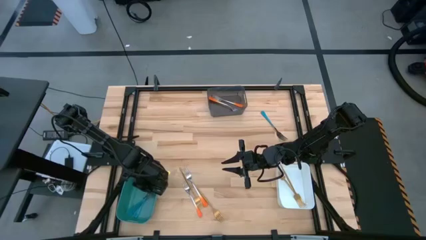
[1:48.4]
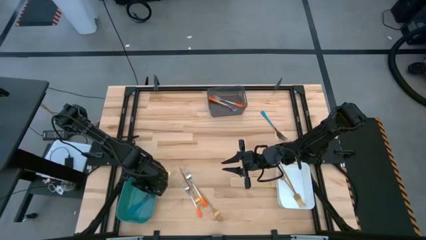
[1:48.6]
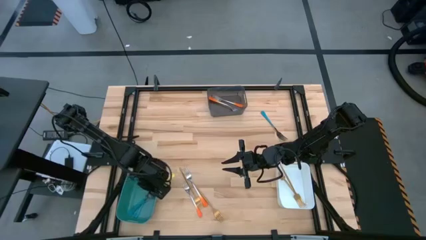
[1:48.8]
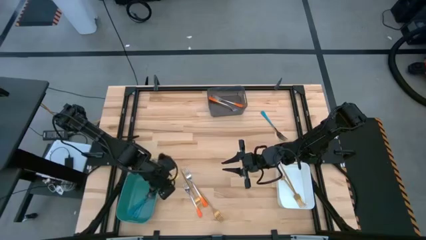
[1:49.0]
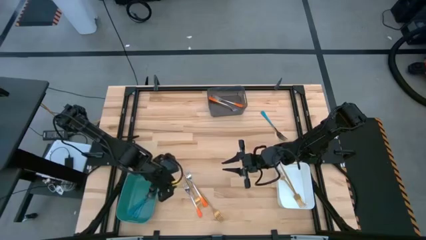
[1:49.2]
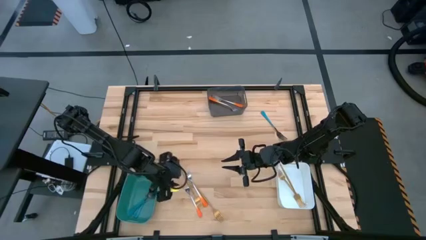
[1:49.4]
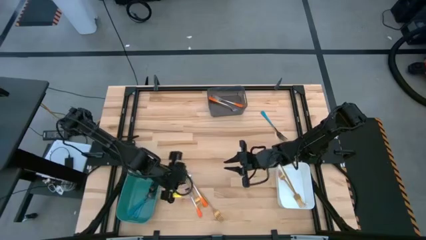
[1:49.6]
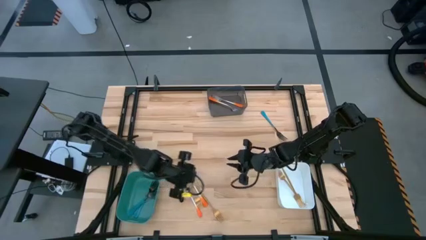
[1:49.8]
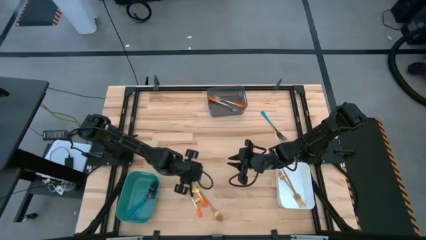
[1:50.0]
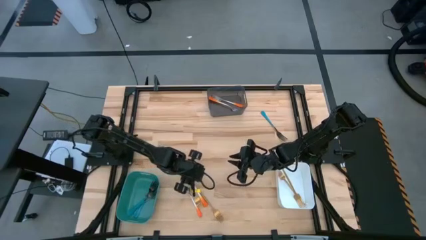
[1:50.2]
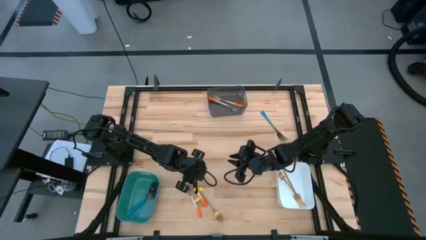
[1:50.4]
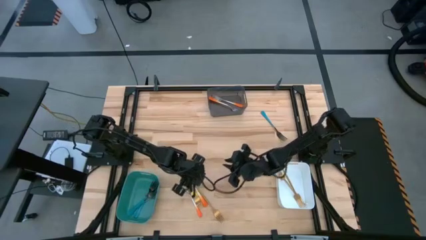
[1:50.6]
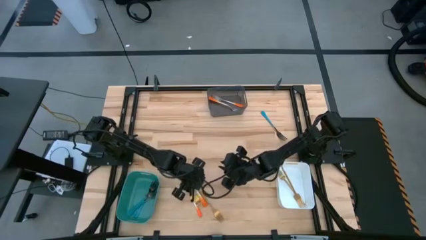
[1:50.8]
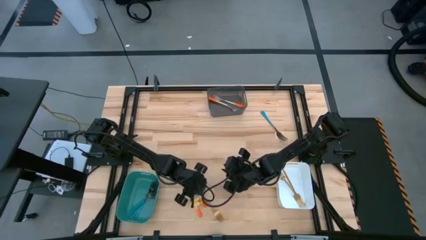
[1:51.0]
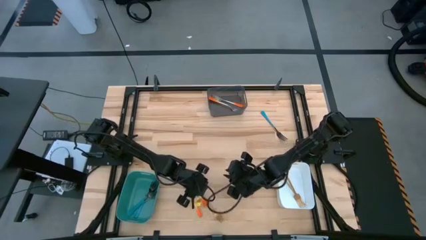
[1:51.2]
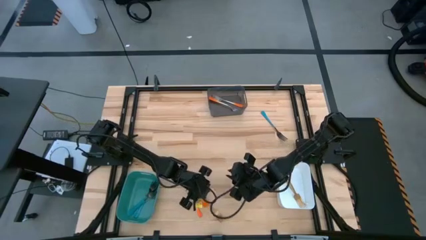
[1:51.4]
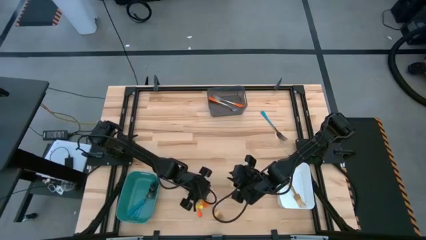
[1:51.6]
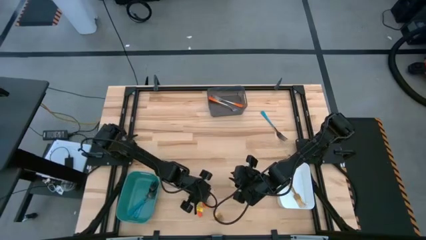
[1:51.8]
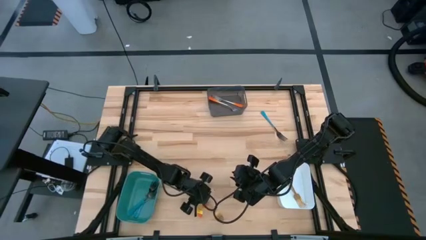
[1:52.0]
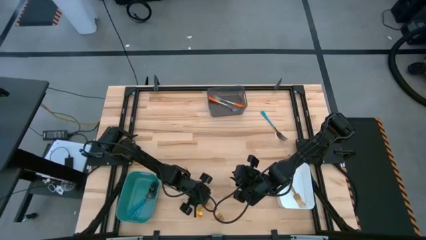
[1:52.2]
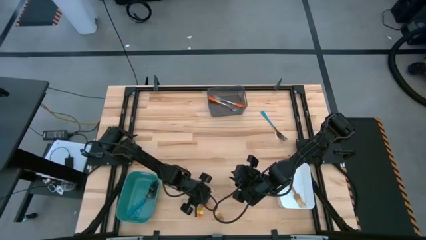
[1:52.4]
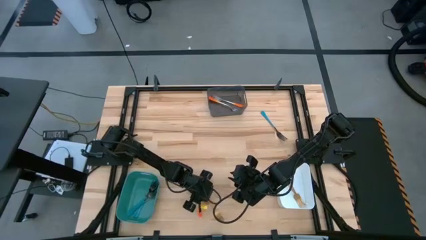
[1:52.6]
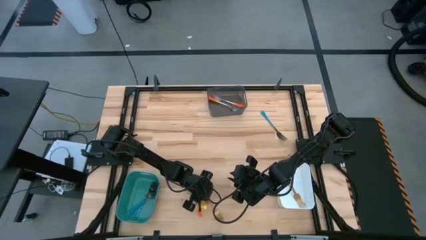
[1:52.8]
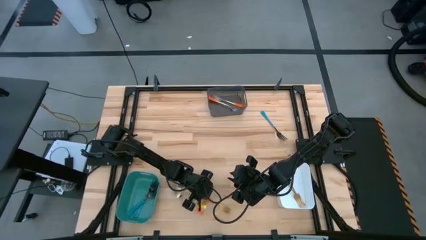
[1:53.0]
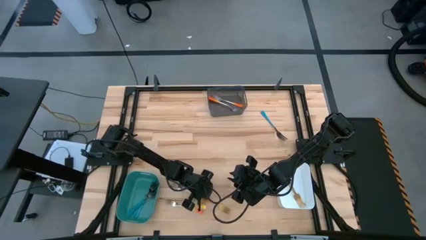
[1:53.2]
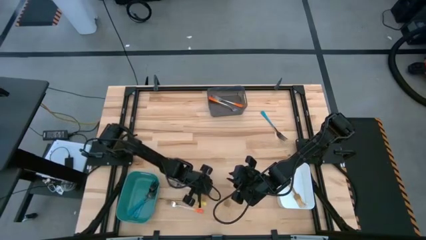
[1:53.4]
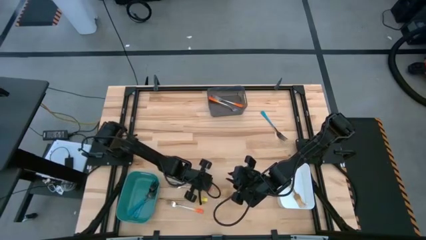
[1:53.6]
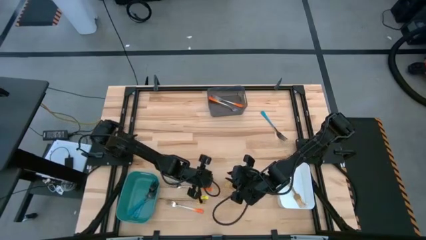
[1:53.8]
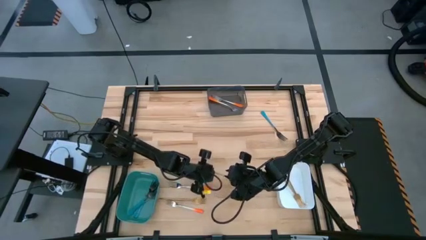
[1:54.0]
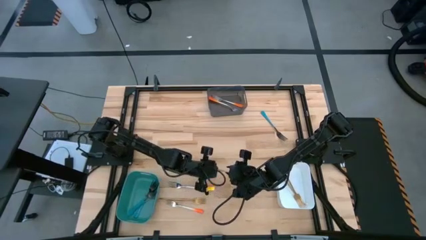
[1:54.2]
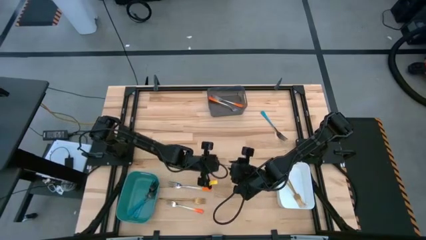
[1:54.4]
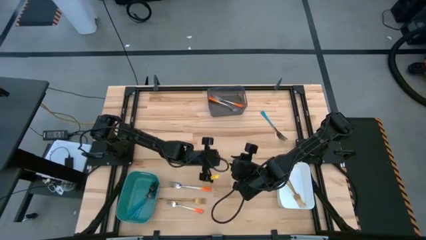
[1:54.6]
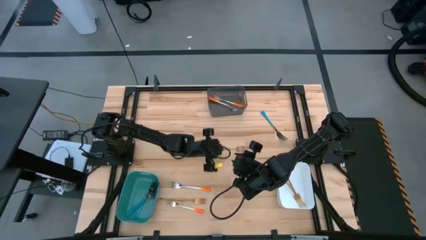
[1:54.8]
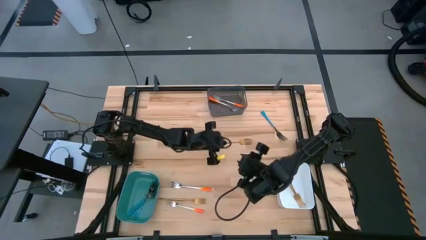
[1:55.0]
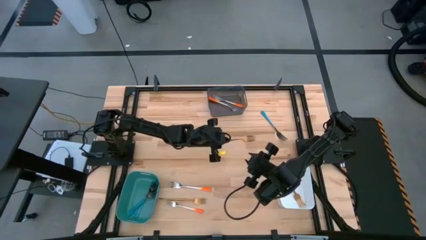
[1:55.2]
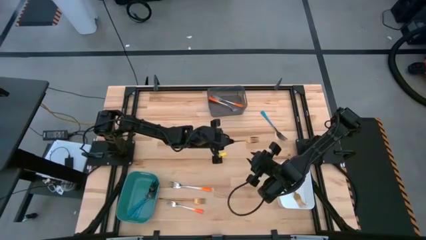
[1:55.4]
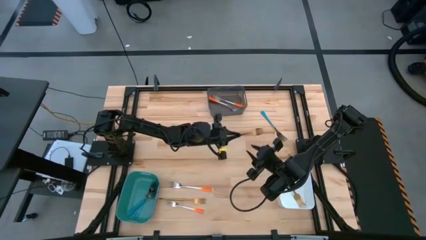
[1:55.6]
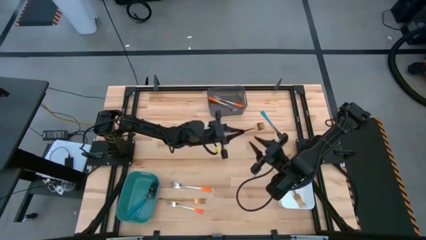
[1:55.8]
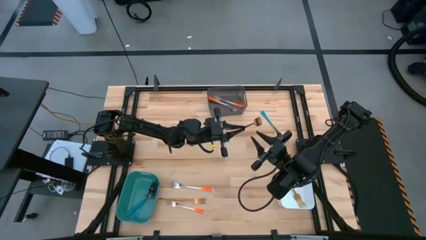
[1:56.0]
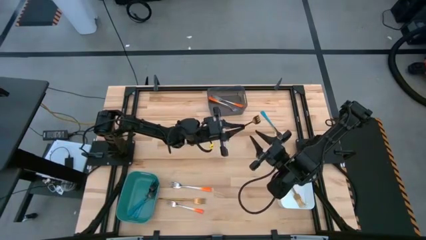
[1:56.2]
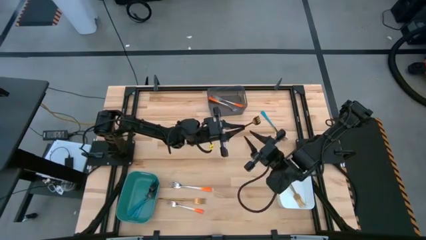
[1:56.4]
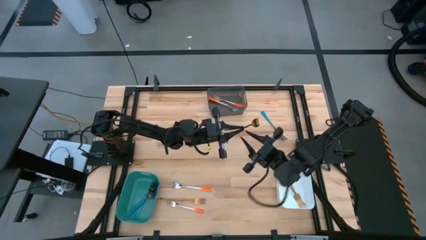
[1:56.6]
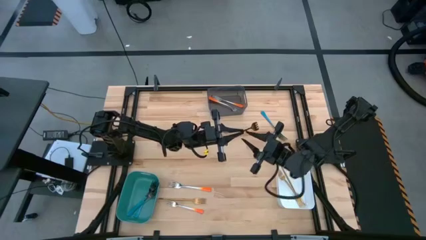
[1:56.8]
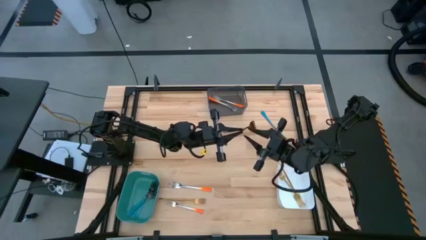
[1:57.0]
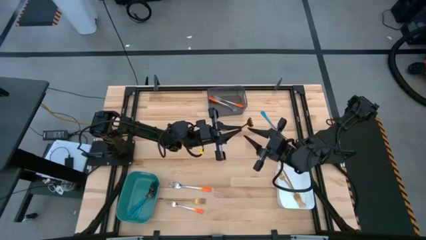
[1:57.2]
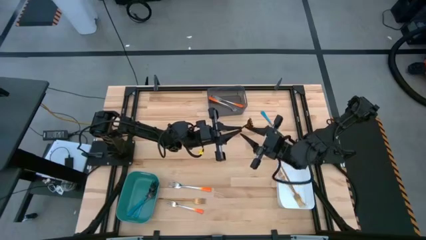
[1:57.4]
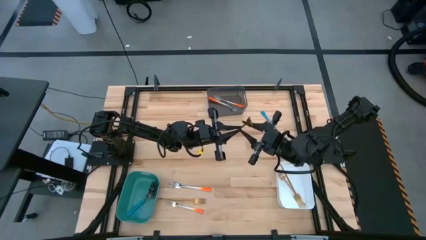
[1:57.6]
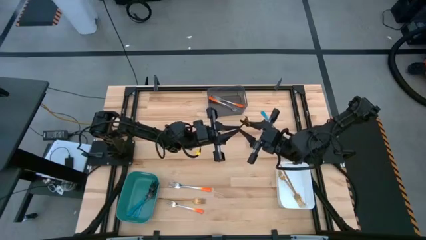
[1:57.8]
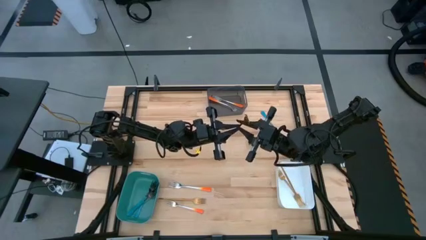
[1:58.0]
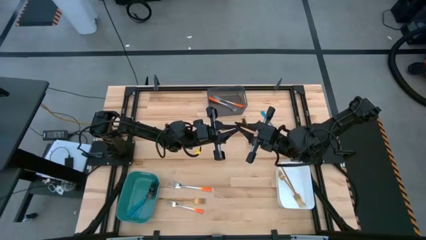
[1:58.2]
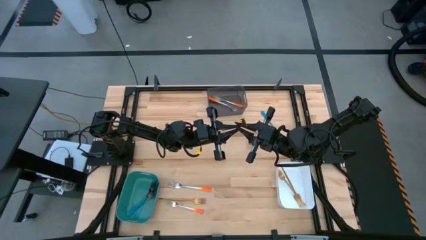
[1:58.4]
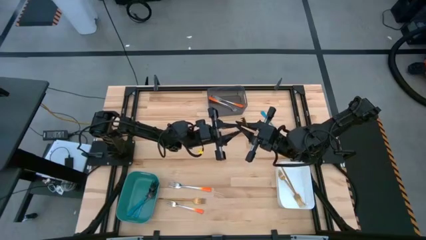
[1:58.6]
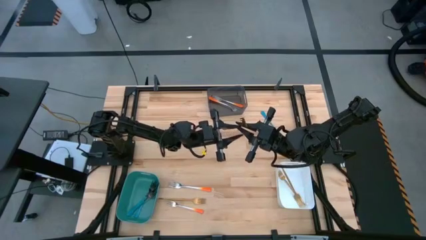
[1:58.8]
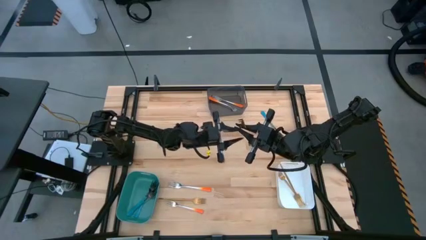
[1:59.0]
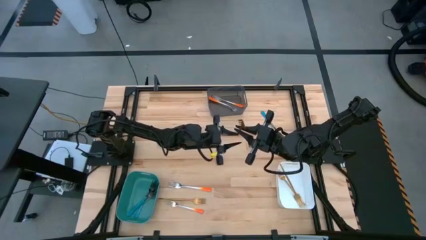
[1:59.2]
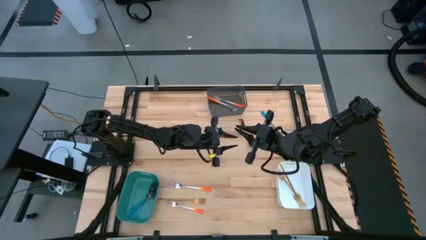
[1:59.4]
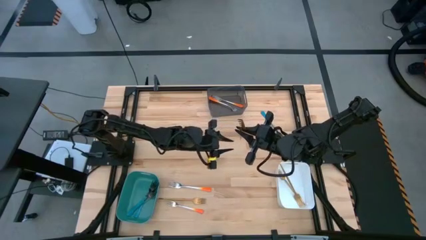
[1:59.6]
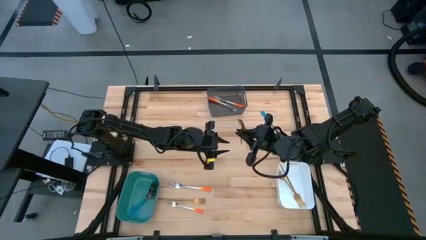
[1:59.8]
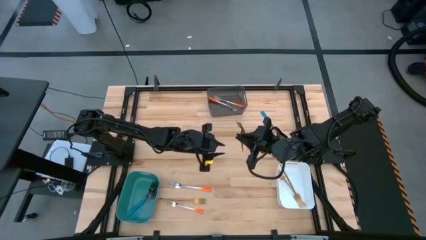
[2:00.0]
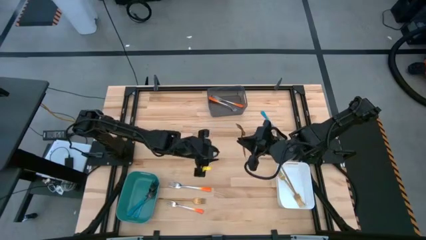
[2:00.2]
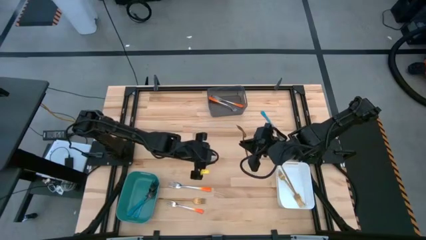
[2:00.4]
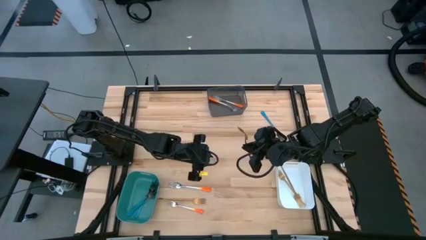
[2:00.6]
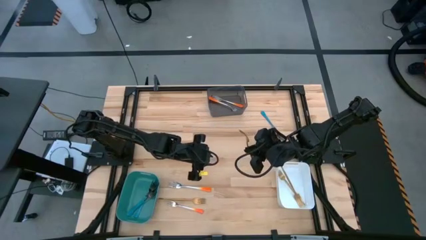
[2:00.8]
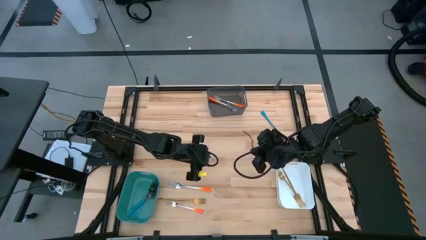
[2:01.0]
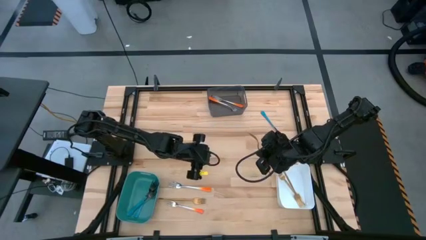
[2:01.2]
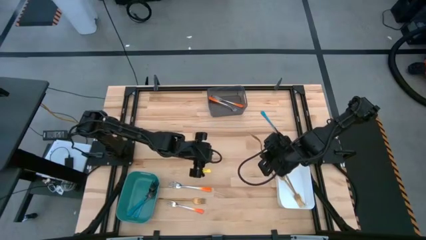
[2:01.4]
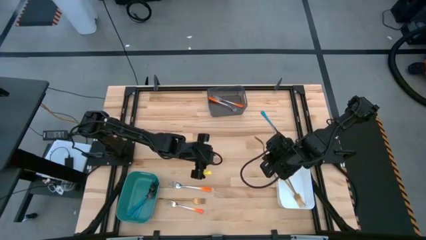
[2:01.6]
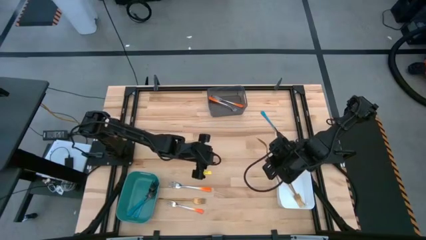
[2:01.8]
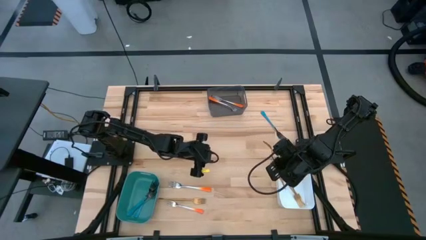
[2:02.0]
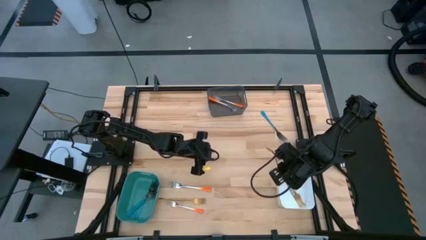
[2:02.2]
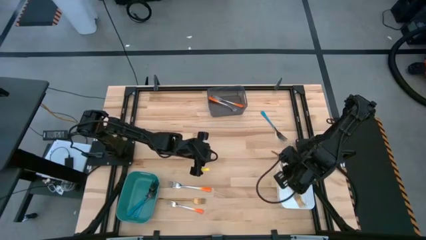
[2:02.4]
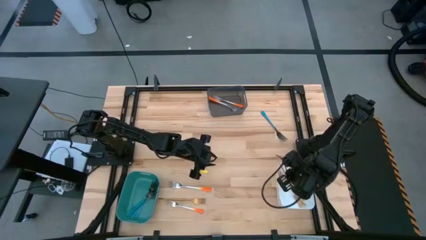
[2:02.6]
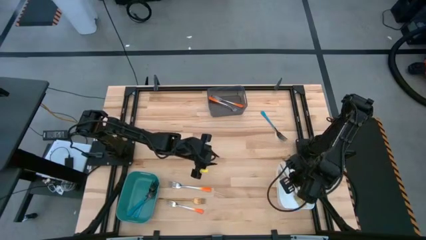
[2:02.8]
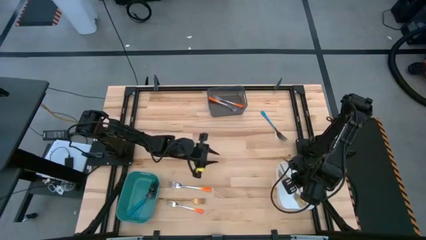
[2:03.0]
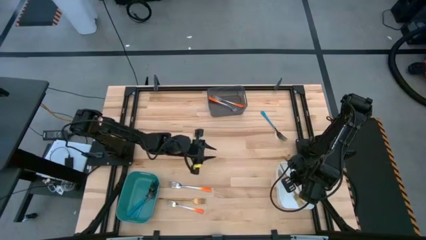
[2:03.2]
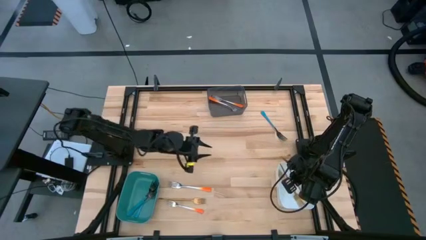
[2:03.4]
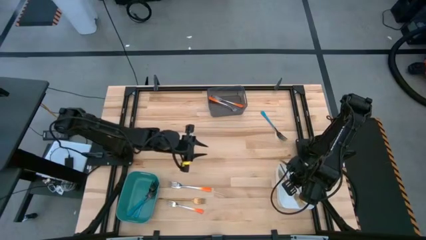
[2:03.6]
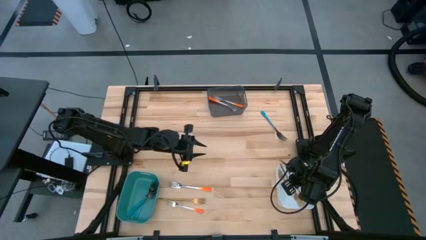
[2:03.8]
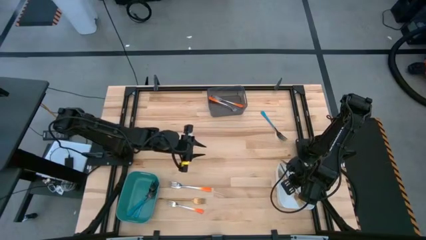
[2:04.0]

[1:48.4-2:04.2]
Task: Sort silverware by color (type)
Put the gold fork into the white bin
